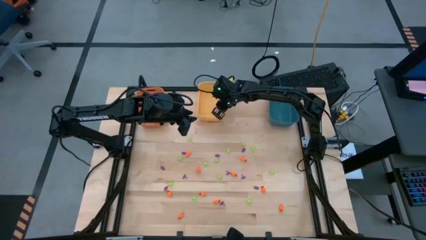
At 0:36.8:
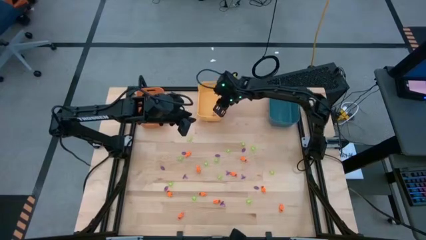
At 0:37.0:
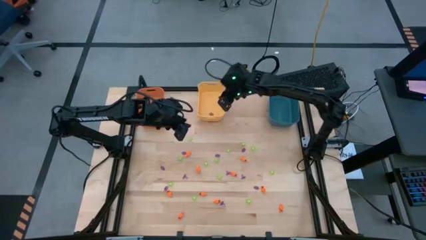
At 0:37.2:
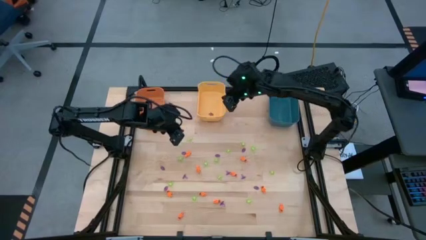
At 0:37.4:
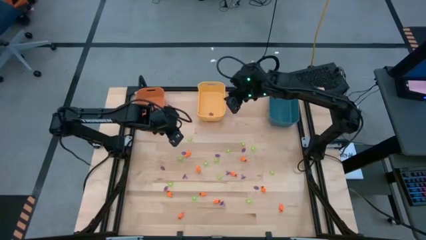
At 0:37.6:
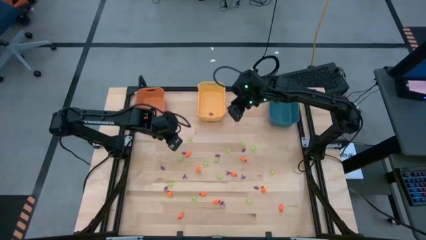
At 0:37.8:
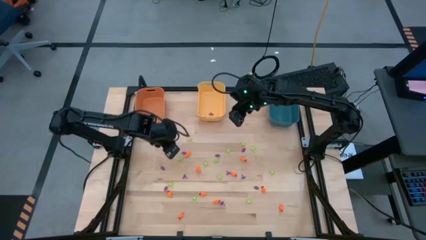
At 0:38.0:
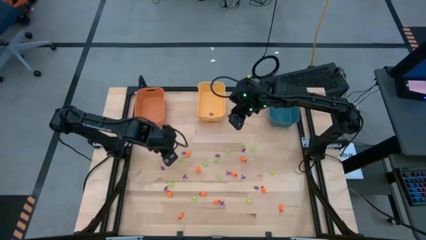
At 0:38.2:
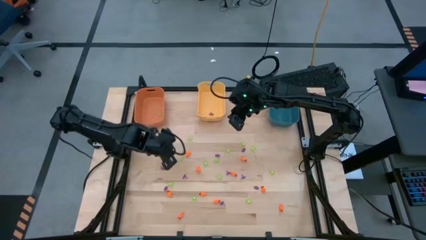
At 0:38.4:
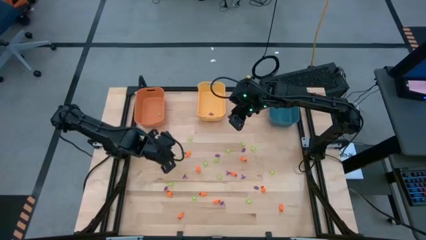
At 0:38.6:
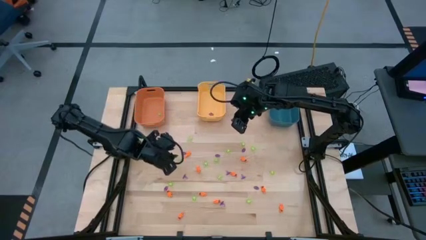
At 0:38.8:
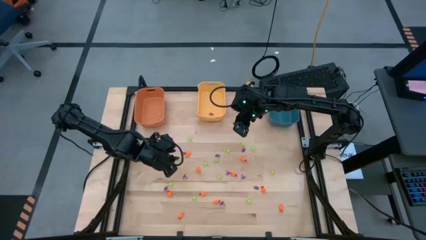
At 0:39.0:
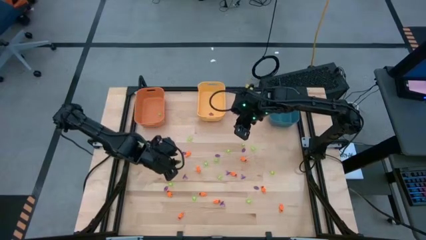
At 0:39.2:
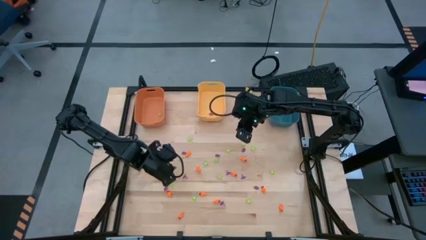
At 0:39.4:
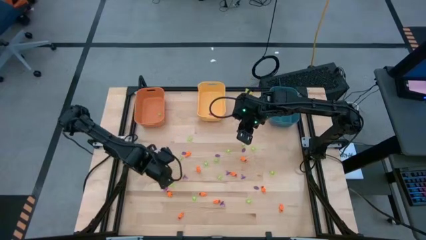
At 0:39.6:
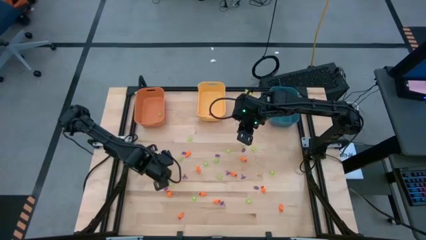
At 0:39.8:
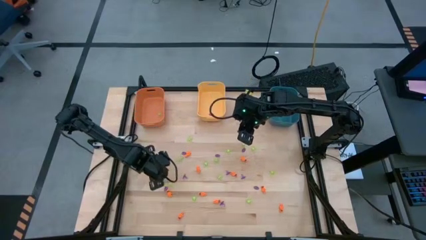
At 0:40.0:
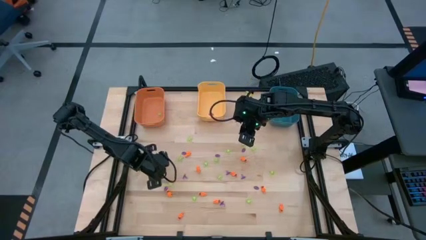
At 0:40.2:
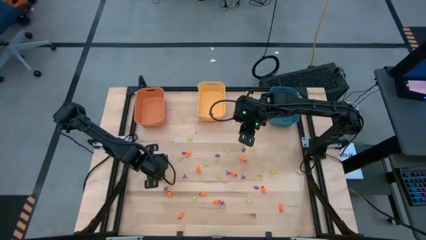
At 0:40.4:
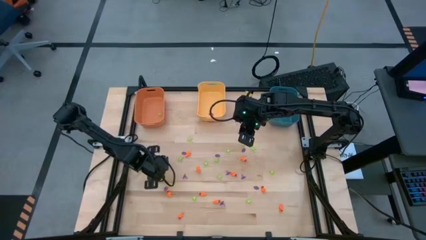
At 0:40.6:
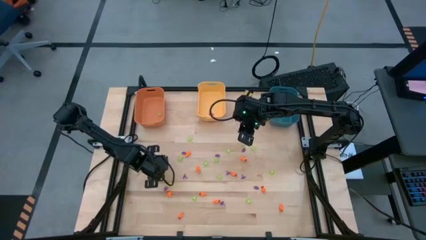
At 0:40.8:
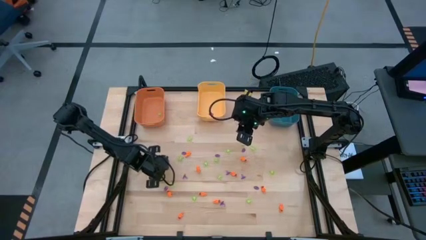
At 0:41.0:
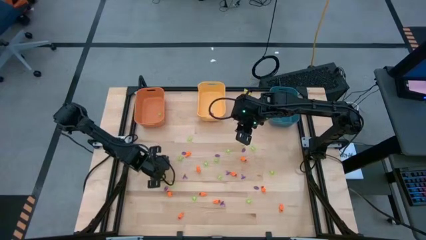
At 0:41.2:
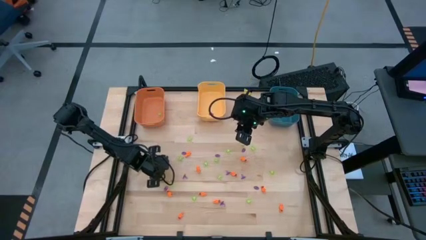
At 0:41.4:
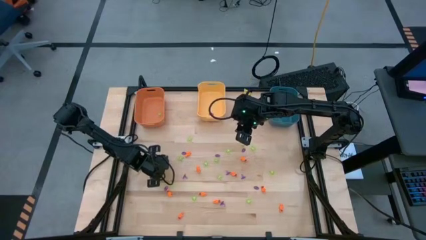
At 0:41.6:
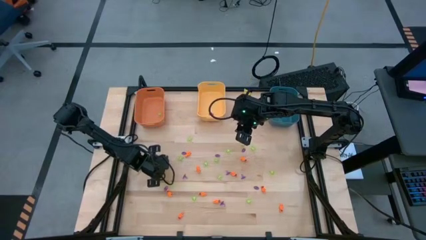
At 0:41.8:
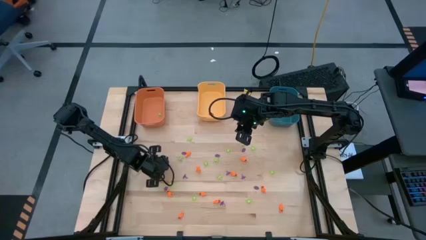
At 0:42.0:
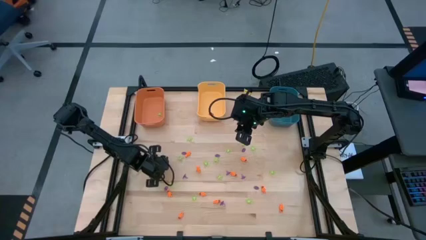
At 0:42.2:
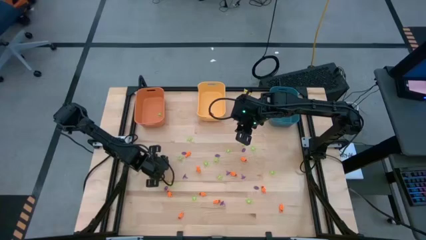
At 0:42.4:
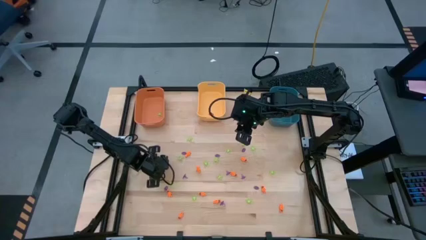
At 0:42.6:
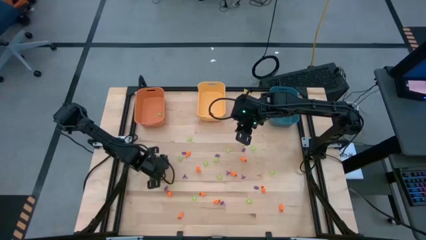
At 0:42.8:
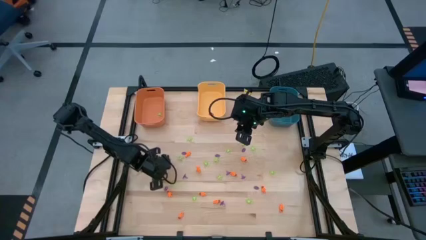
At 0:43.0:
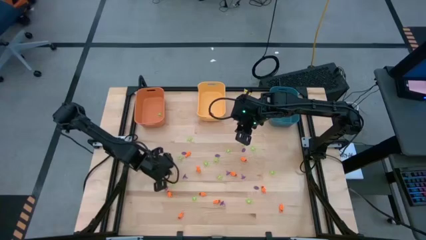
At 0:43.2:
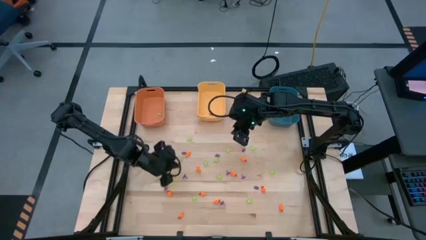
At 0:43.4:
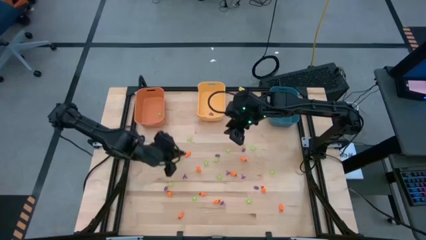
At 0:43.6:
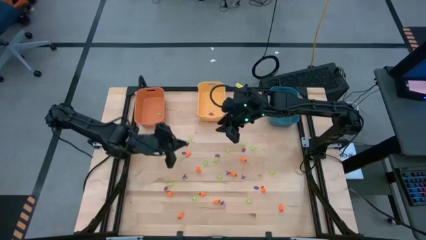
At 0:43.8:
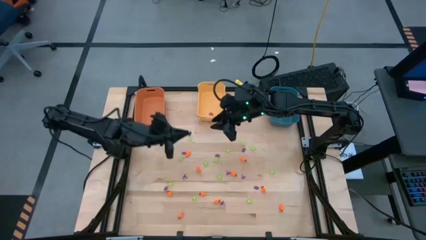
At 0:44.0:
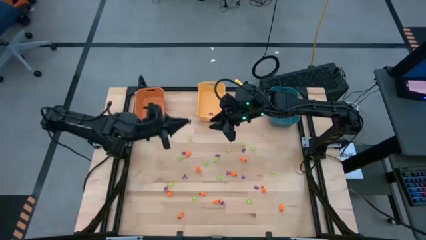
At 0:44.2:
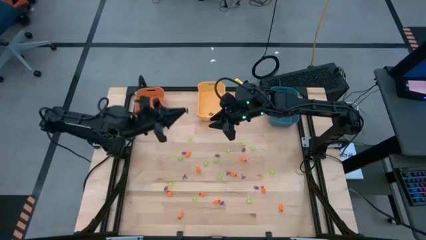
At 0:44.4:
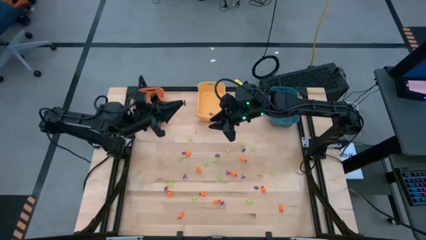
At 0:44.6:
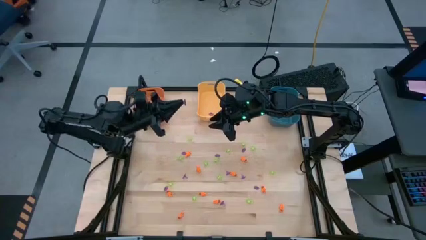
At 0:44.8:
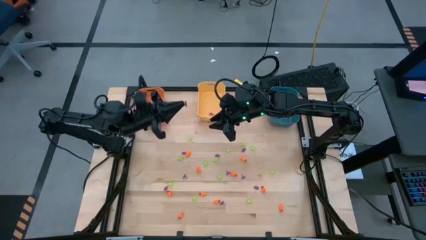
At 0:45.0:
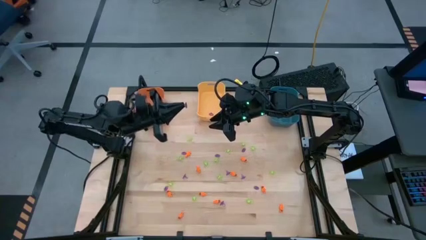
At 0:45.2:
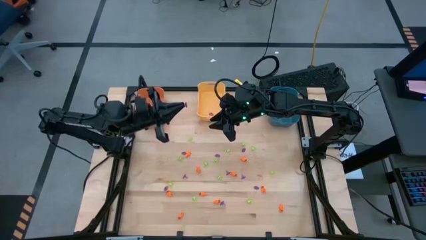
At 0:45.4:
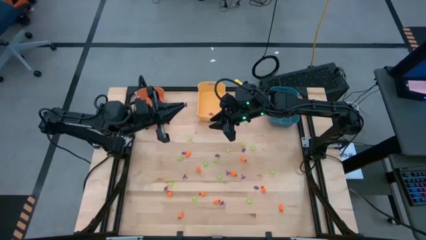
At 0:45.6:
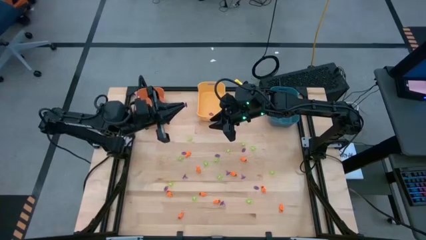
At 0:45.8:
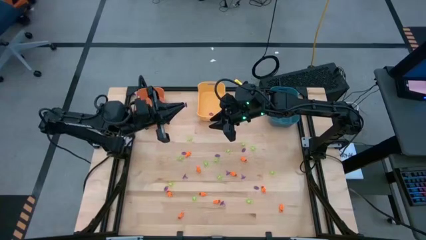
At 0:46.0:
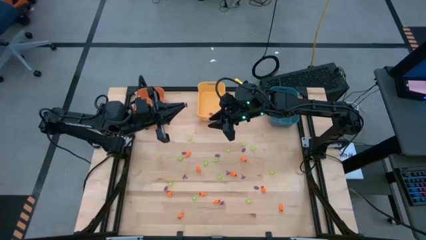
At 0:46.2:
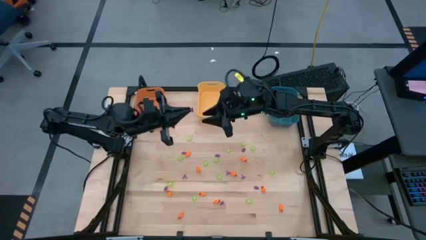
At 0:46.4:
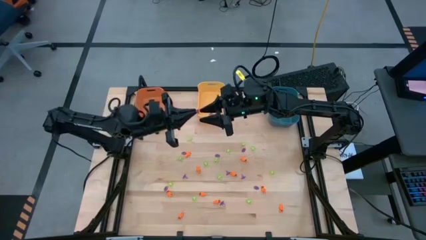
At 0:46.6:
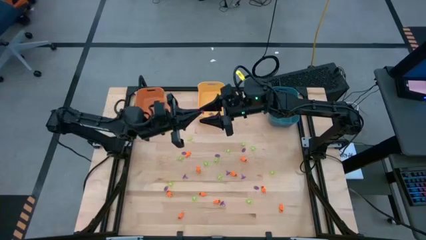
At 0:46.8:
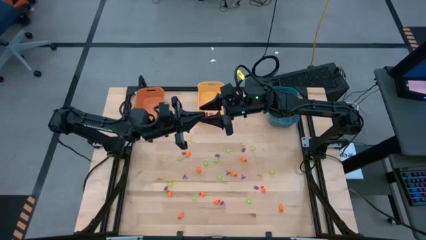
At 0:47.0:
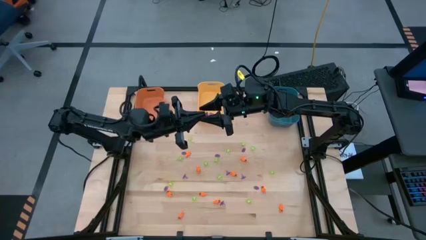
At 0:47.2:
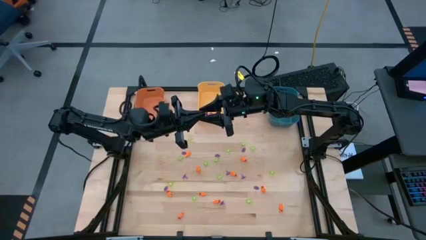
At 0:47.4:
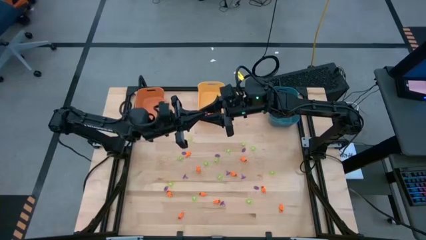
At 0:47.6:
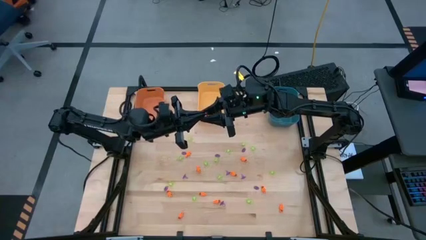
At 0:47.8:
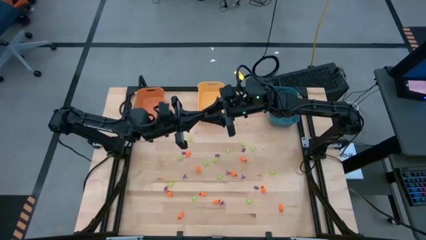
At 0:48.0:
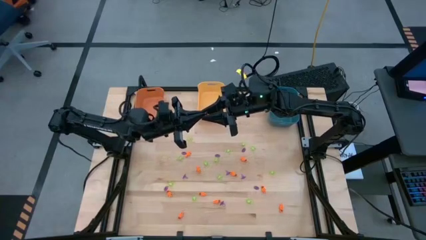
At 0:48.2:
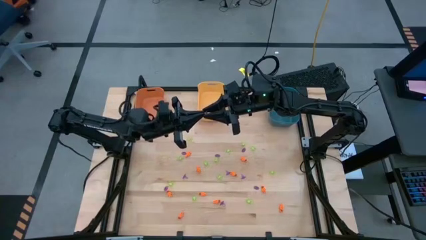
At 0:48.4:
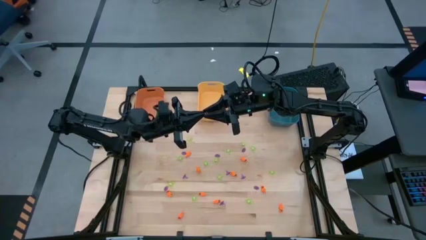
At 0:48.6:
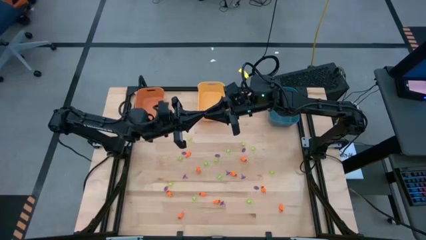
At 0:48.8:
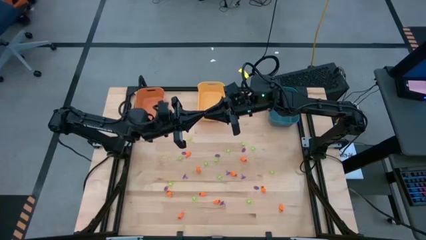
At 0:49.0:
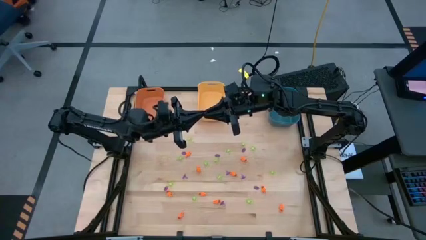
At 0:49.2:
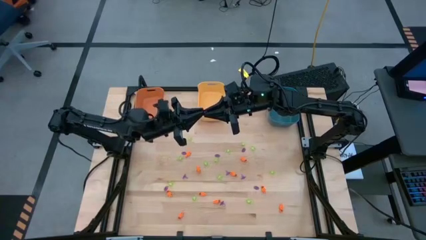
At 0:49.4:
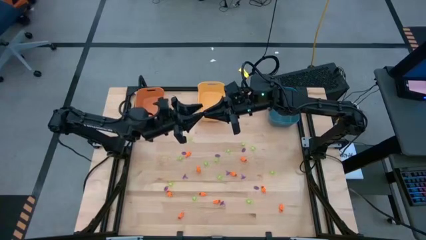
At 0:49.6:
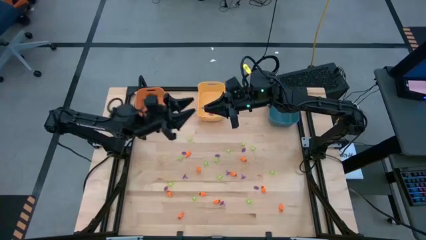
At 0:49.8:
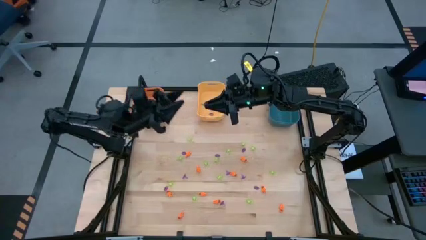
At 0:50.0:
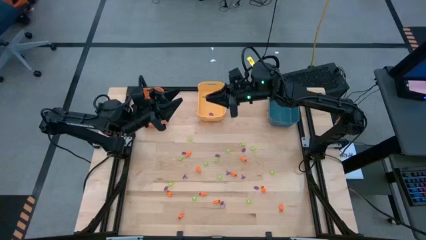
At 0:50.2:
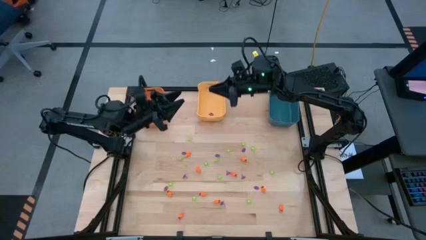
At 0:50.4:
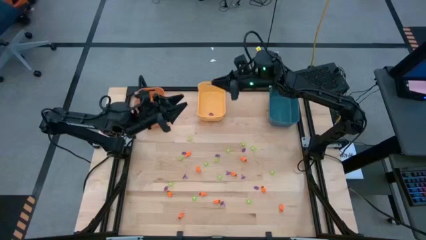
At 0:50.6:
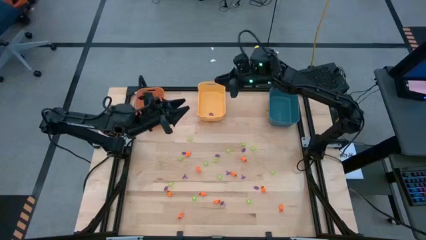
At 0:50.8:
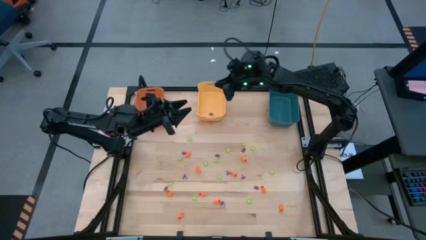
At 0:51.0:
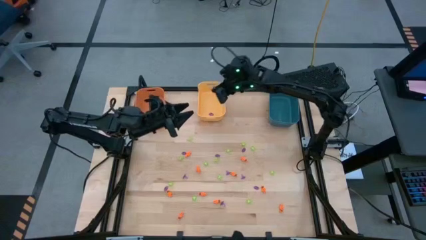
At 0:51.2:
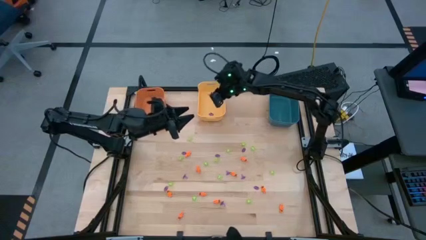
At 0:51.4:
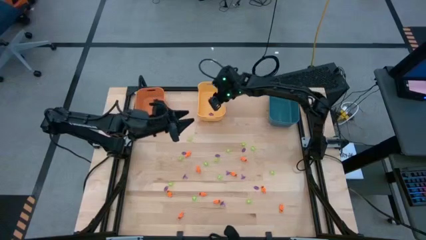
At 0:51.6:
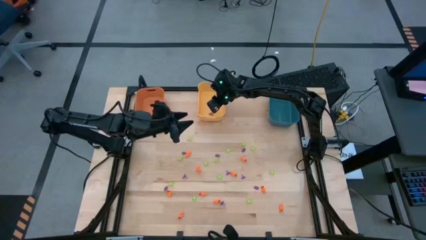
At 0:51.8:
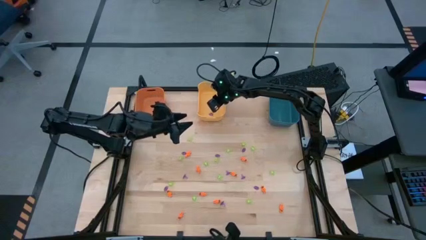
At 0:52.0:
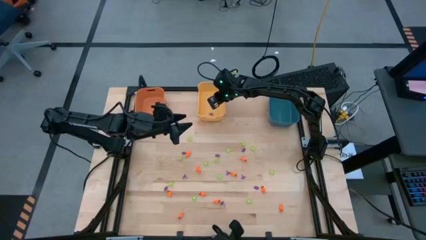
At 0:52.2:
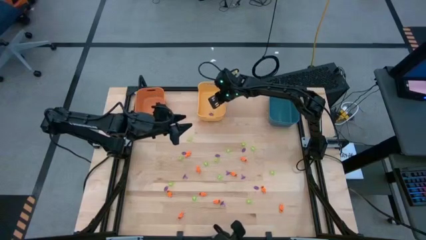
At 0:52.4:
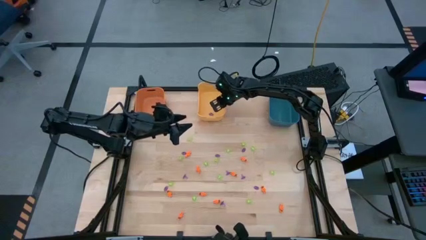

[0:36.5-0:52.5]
Task: Sort Halloween decoration
Put the purple witch hat toy into the yellow bin
